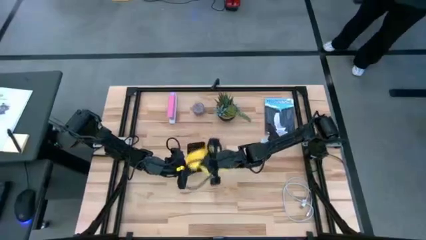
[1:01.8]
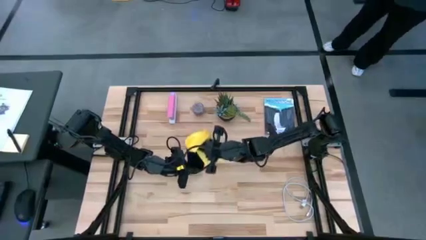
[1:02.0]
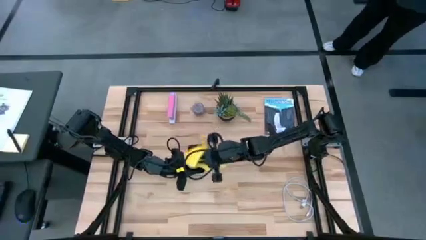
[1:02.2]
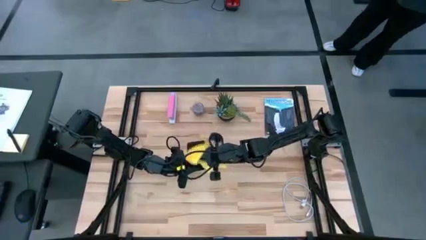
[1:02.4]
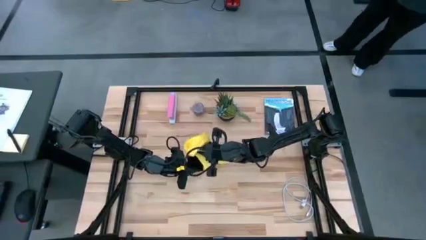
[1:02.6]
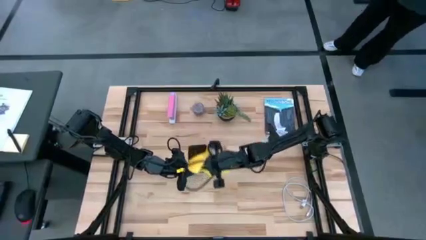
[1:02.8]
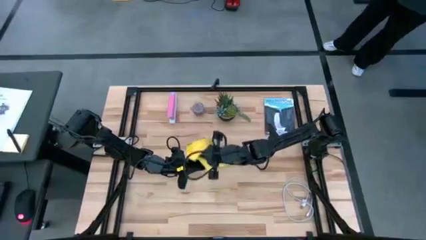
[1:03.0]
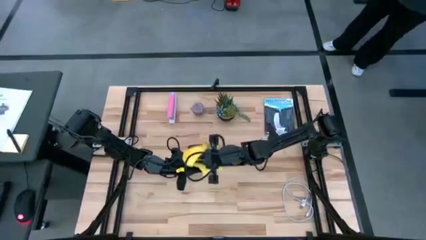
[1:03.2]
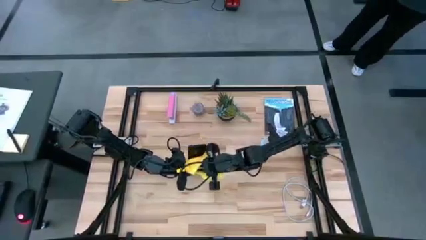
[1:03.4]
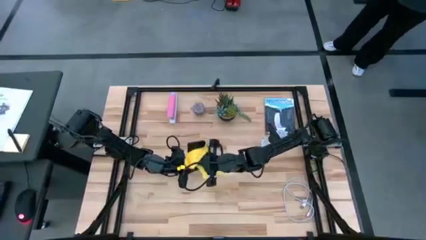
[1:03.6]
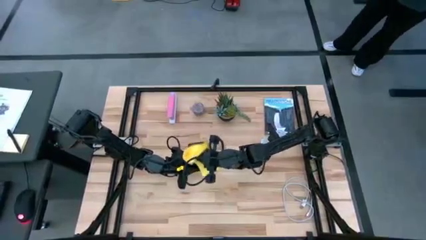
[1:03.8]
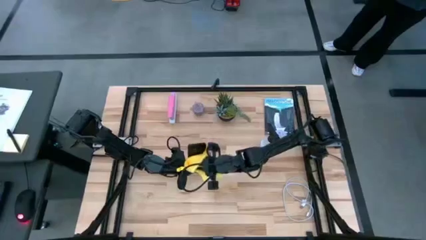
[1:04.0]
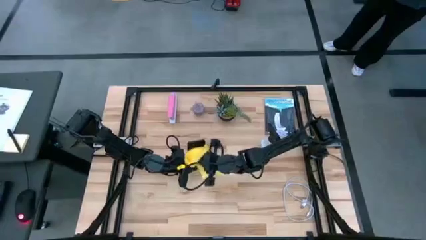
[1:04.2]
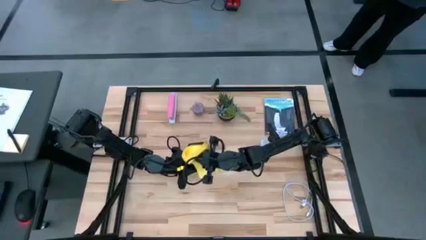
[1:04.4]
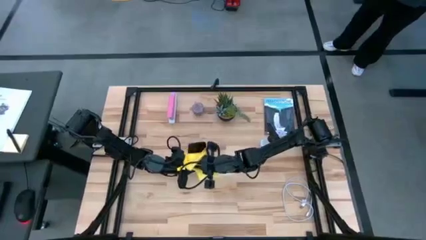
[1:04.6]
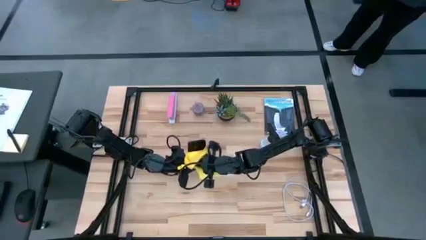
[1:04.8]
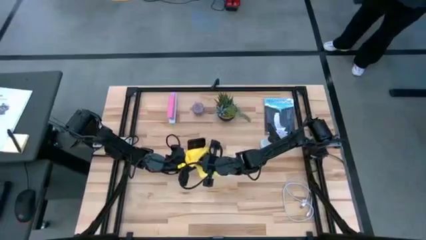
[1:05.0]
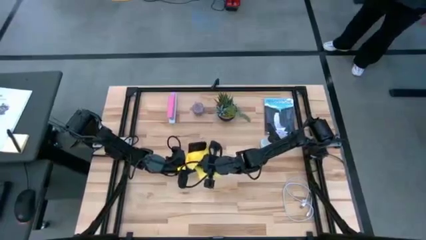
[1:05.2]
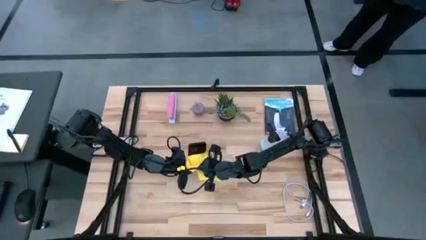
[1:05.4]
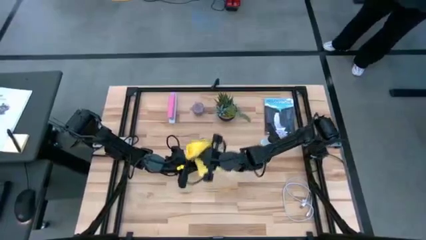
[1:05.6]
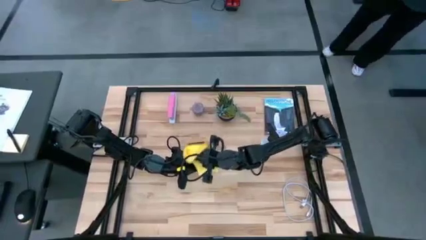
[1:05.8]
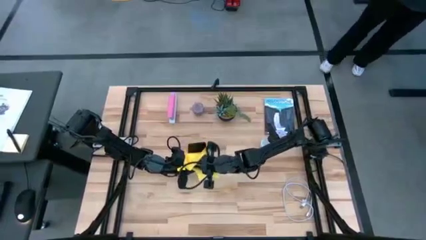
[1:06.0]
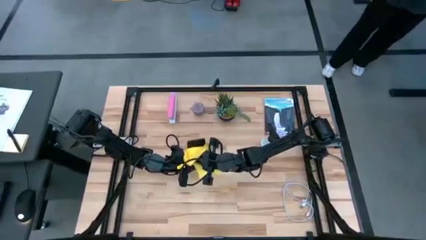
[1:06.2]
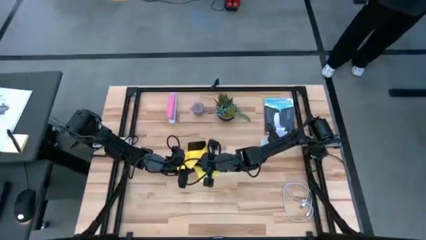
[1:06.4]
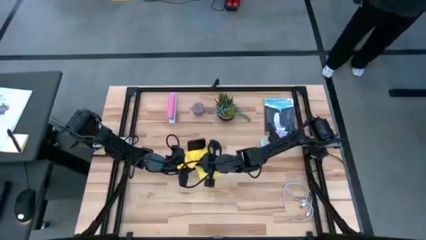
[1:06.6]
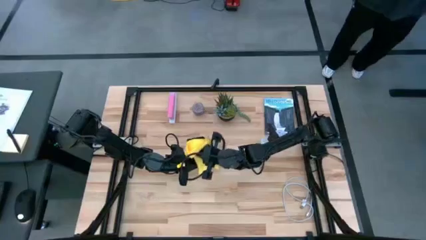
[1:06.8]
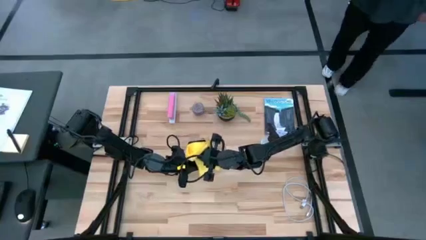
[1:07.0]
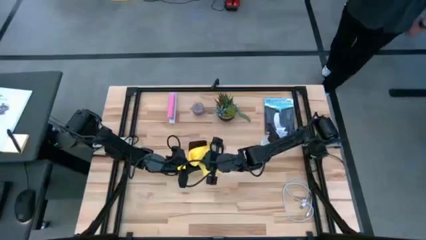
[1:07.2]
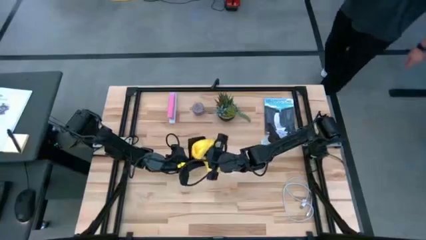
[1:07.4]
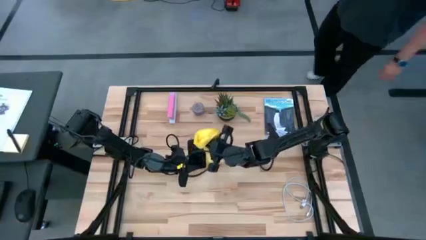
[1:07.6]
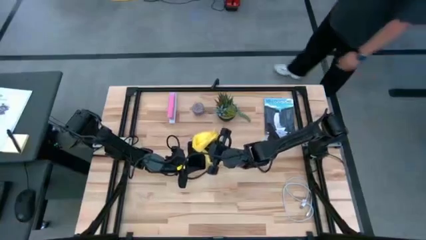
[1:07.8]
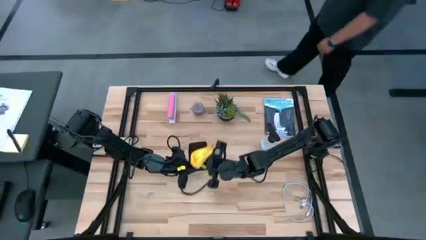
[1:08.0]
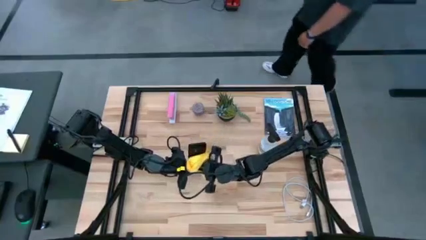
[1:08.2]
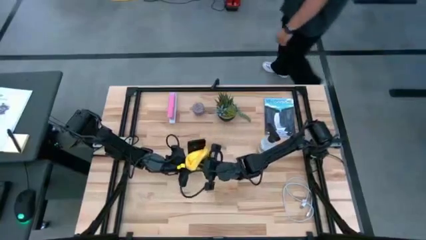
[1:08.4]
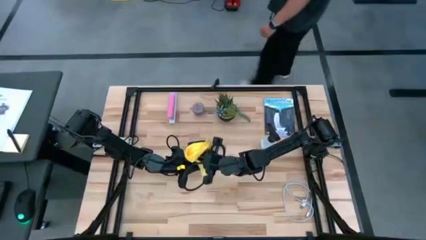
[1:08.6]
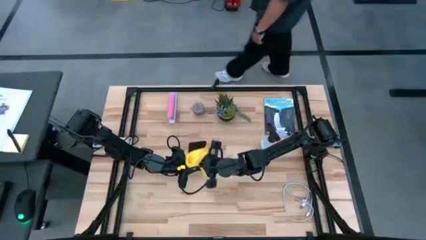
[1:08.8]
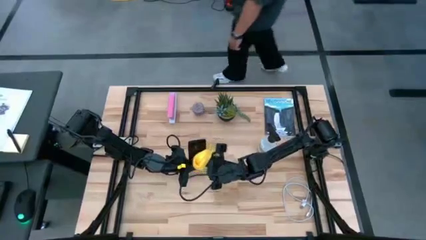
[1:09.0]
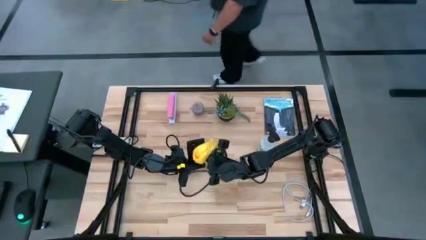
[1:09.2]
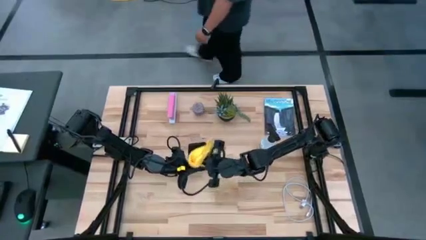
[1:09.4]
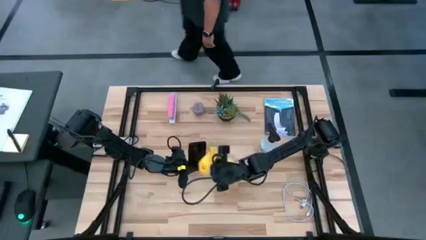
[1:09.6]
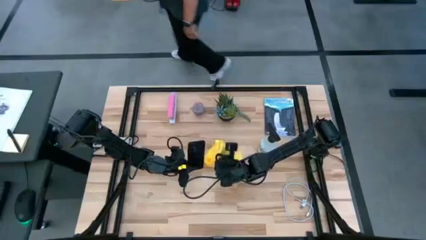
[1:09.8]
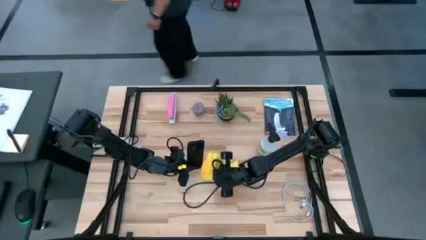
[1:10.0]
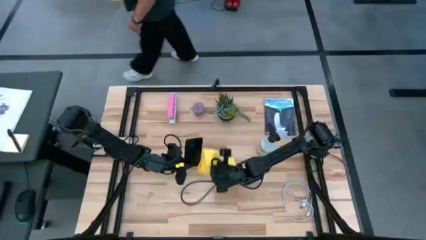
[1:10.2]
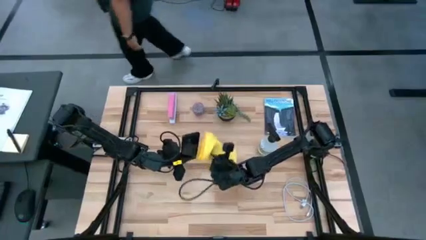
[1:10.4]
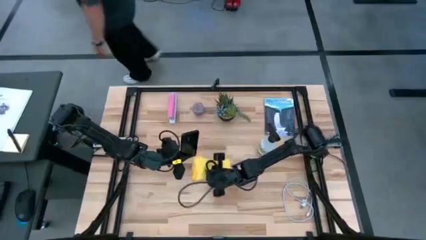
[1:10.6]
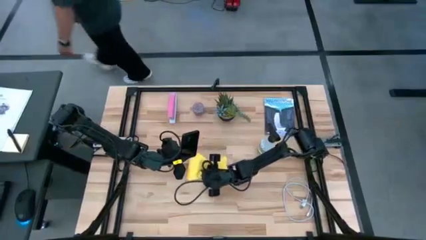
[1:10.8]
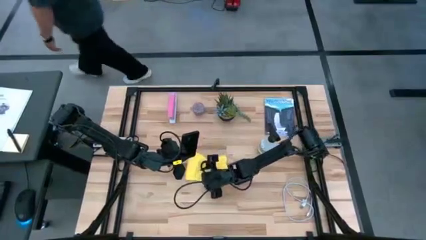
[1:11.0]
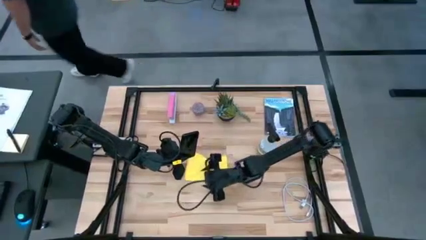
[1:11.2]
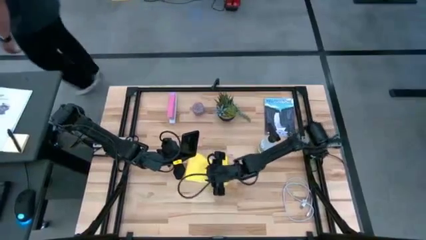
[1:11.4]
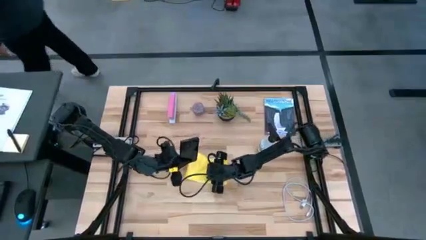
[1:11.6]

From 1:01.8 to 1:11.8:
Task: Apply microfiber cloth
Wipe the back of the cellphone with the yellow microfiber cloth

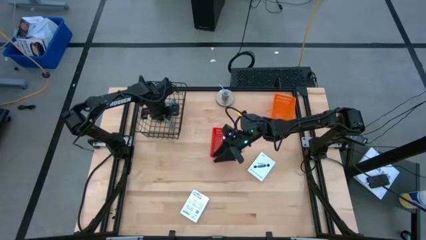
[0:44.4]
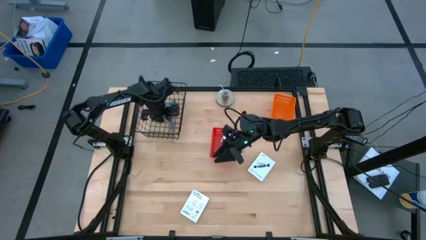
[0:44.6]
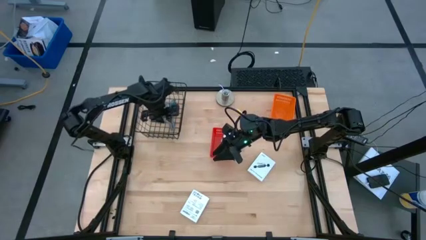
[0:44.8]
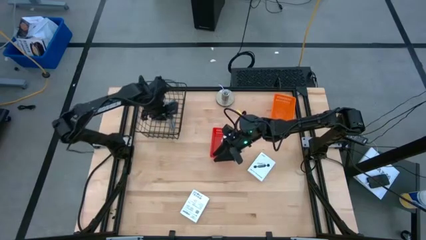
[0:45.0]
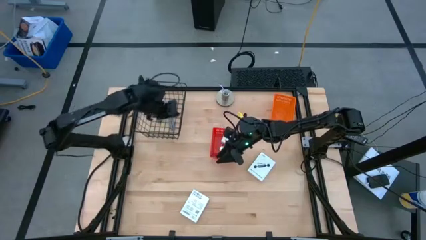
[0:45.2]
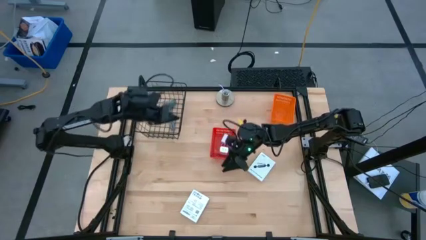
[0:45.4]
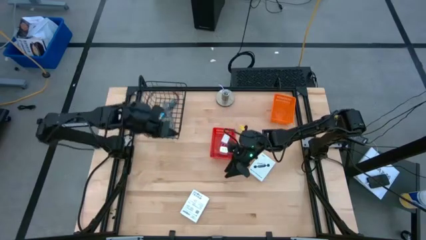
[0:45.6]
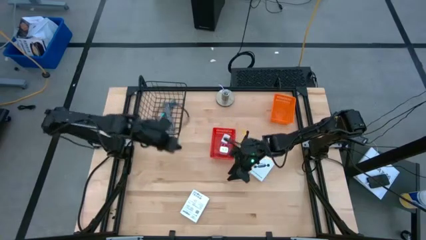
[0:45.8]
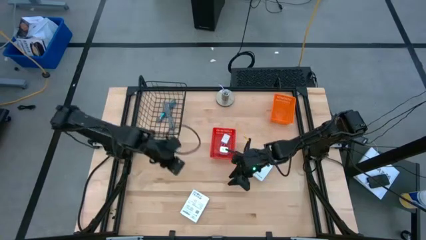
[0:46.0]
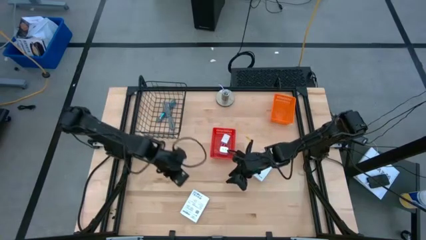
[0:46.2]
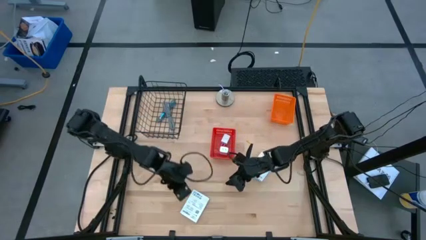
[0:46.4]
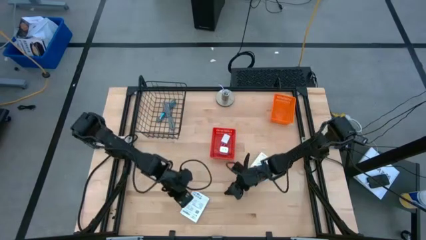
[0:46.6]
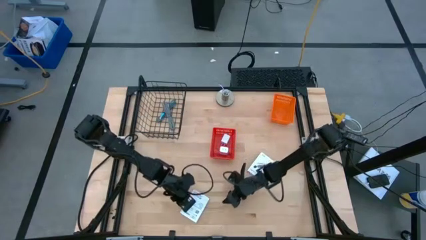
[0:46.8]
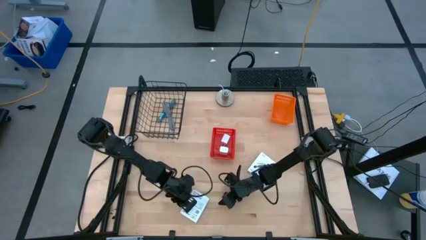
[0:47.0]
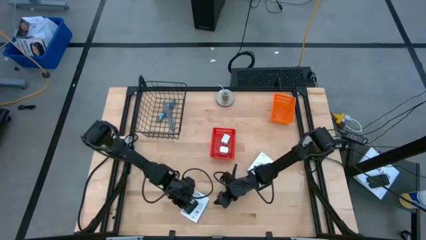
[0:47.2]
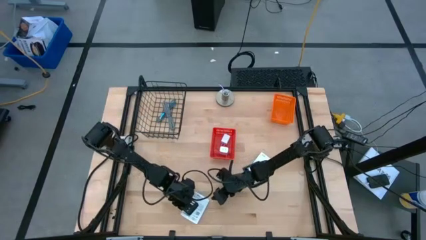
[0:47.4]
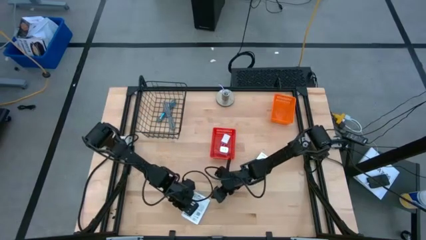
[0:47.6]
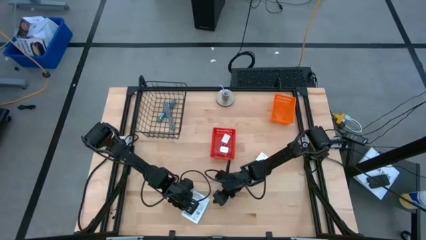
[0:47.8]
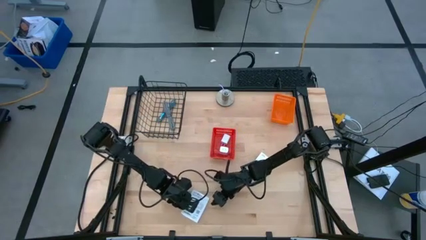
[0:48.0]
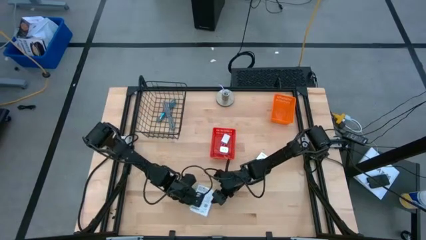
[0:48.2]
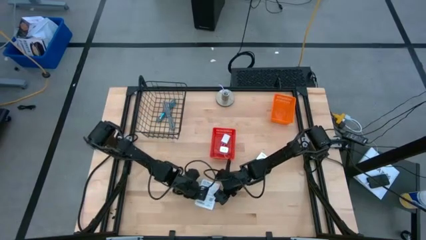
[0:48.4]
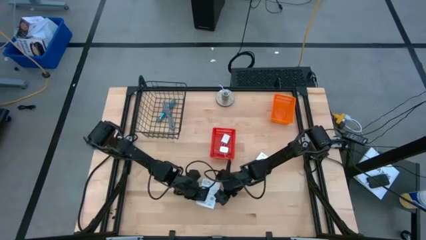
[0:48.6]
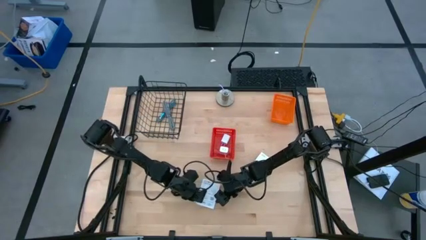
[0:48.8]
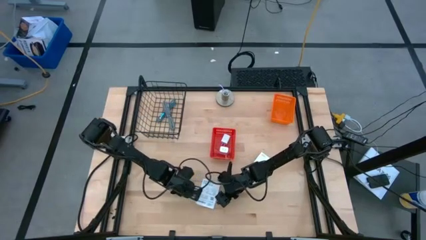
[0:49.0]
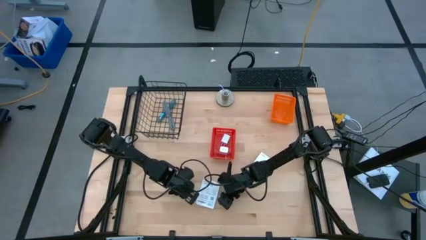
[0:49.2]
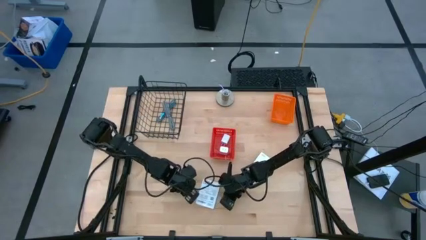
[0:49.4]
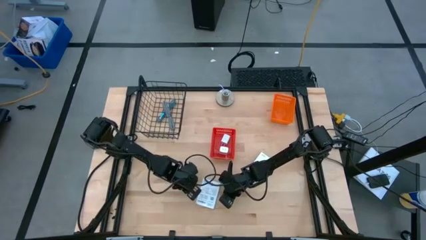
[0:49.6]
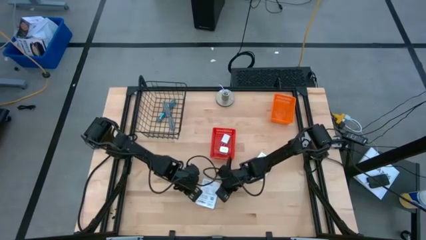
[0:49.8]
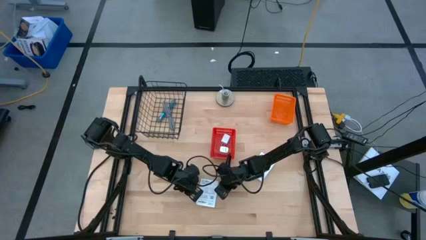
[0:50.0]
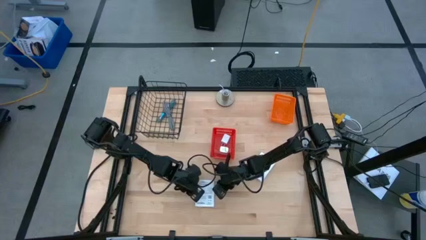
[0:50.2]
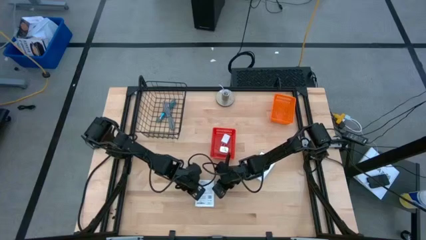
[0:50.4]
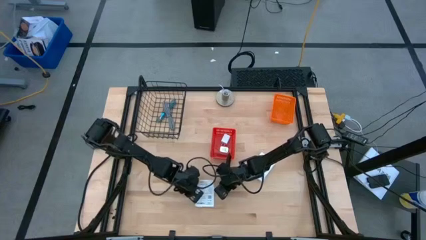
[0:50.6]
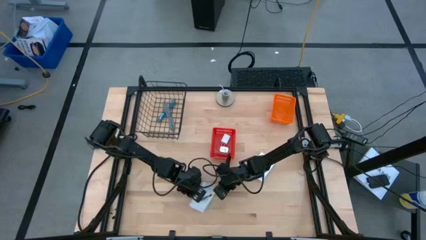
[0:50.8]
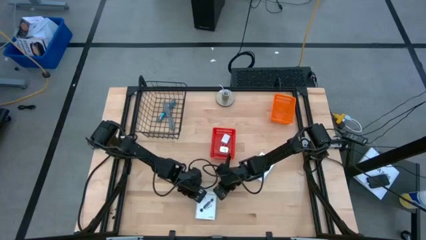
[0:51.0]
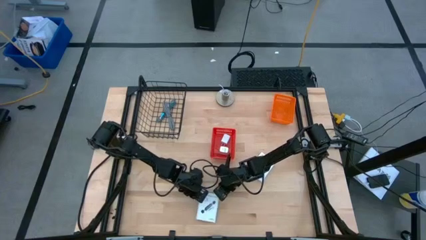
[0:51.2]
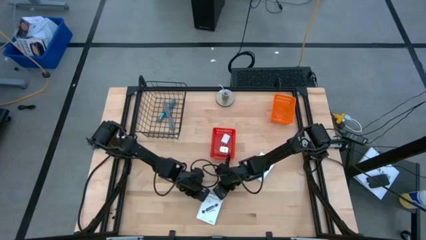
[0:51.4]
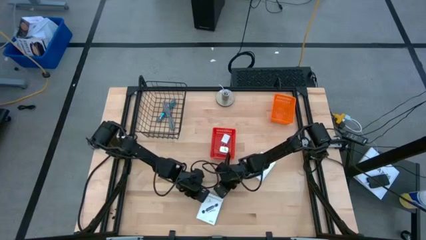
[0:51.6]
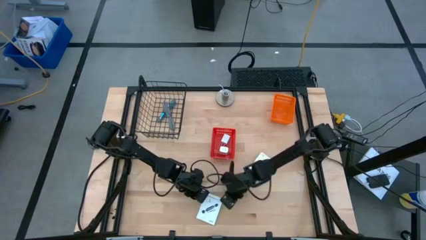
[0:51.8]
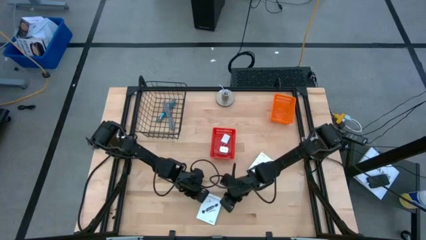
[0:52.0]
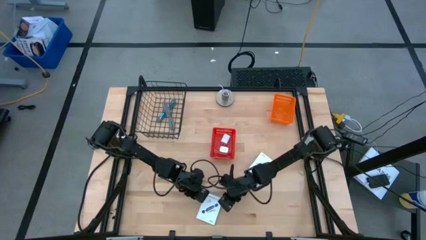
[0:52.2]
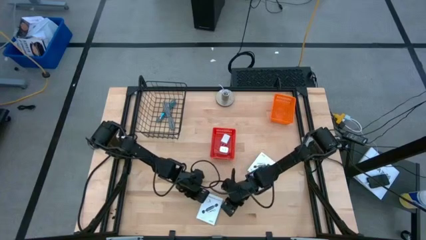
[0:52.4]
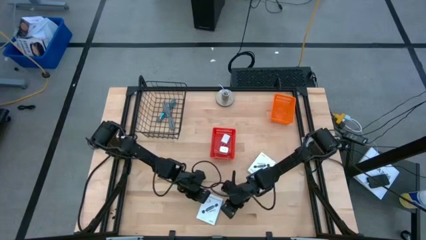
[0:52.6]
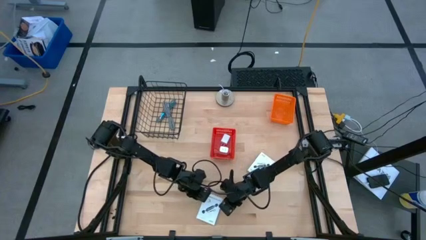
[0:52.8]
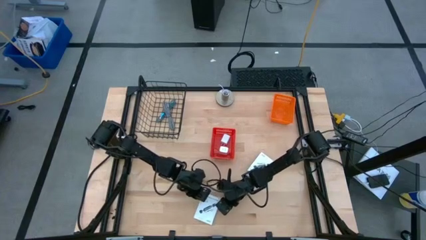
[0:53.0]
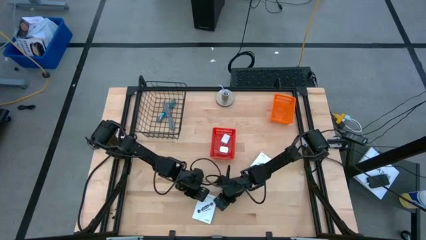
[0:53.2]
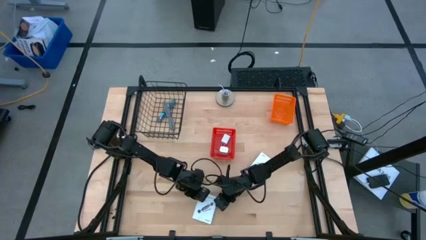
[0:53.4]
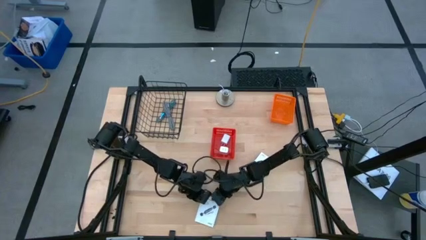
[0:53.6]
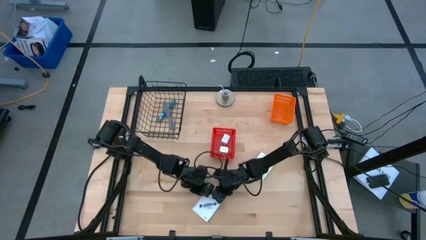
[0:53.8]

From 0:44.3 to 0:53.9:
Task: Pick and place items into bin
Put the left white card reader box into the orange bin
